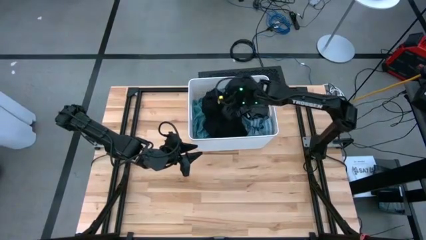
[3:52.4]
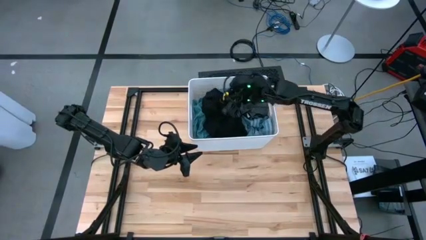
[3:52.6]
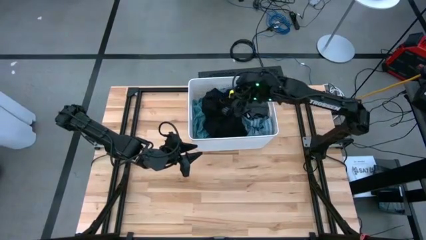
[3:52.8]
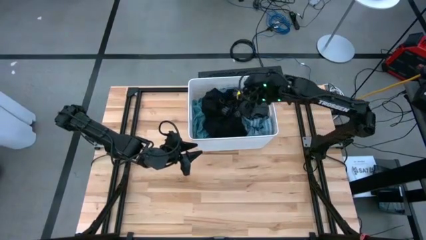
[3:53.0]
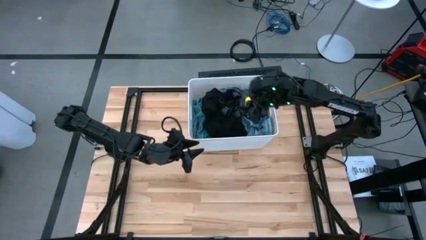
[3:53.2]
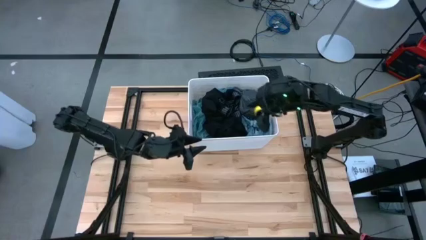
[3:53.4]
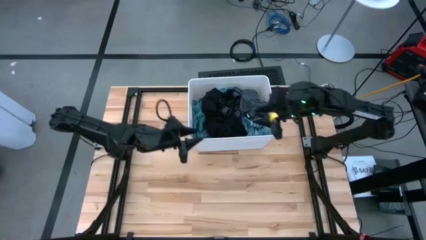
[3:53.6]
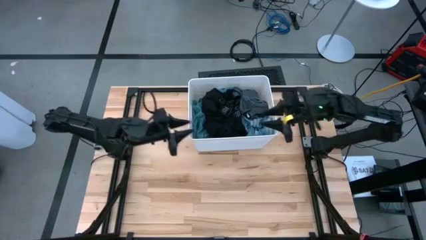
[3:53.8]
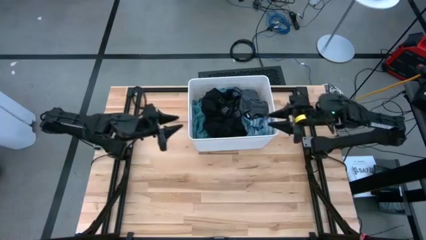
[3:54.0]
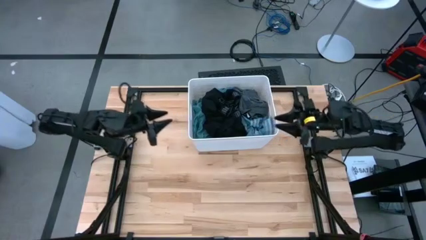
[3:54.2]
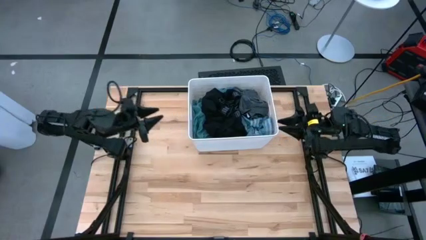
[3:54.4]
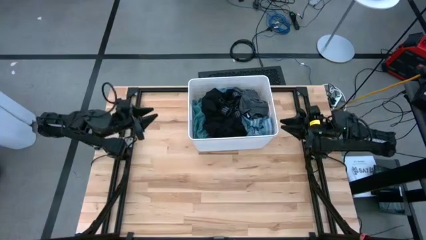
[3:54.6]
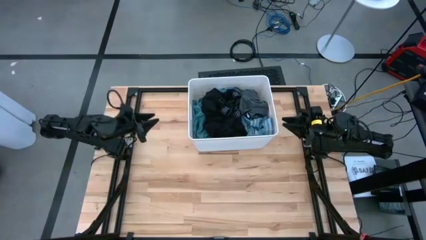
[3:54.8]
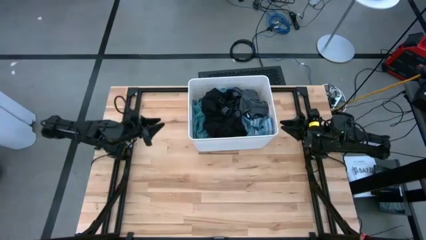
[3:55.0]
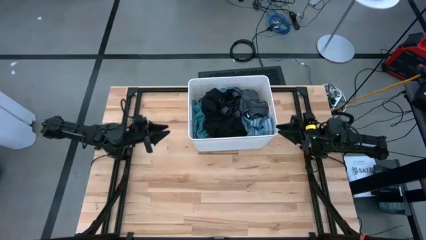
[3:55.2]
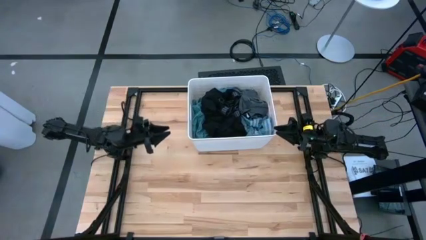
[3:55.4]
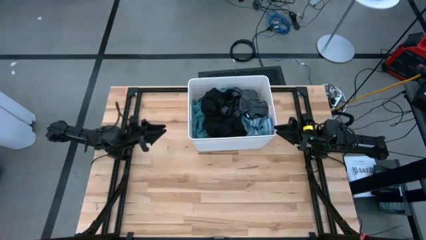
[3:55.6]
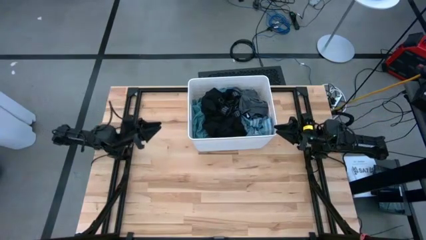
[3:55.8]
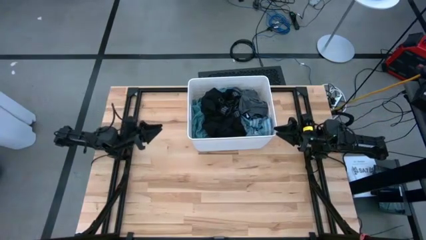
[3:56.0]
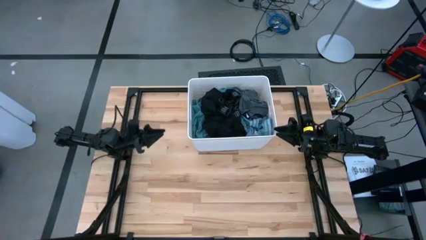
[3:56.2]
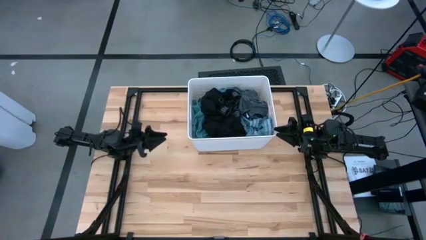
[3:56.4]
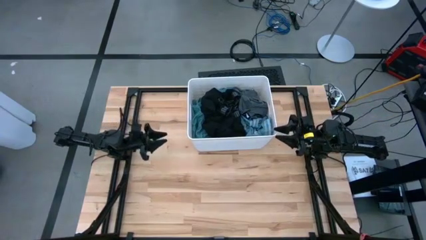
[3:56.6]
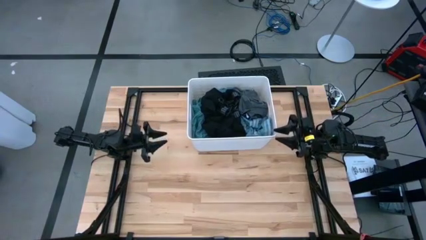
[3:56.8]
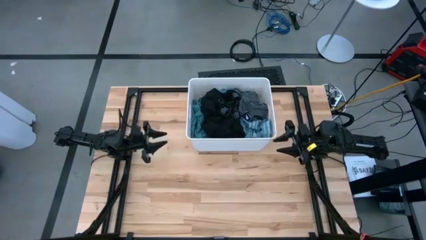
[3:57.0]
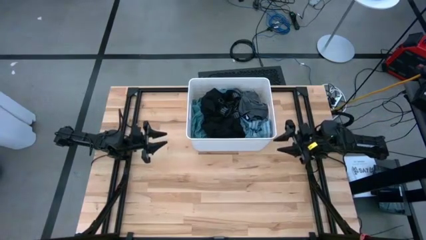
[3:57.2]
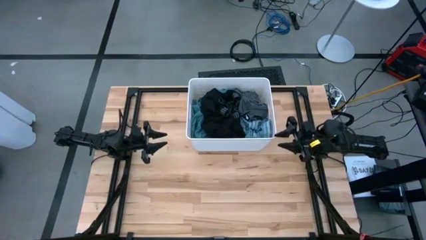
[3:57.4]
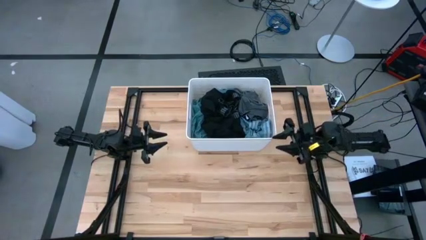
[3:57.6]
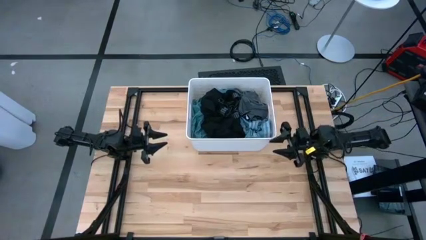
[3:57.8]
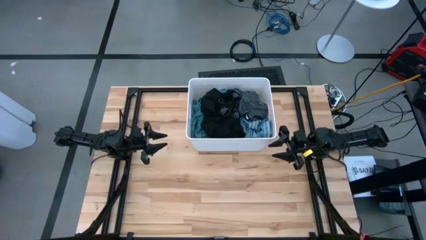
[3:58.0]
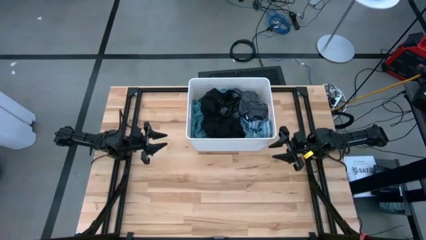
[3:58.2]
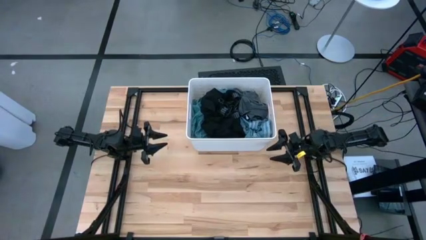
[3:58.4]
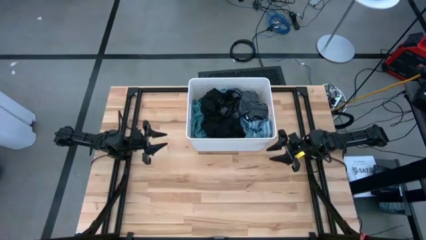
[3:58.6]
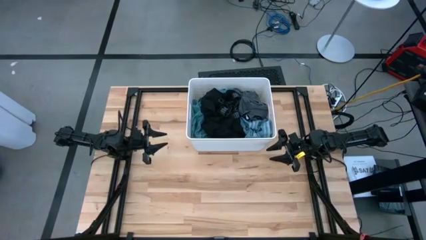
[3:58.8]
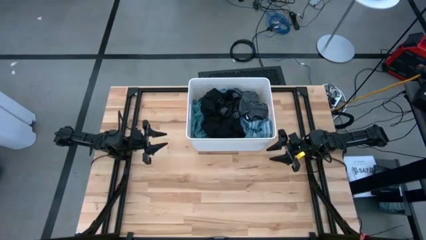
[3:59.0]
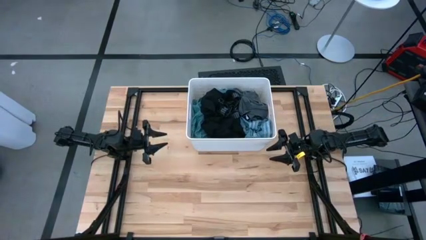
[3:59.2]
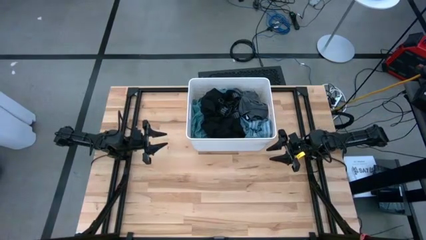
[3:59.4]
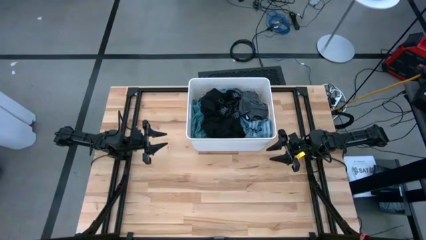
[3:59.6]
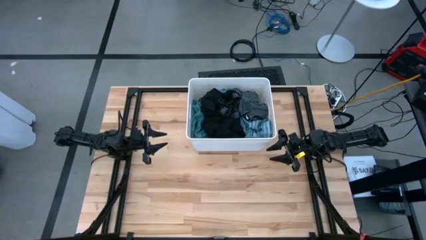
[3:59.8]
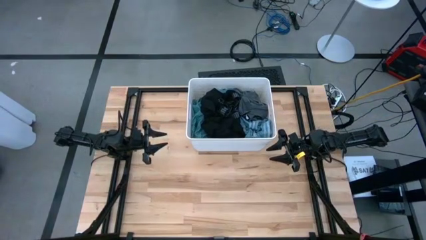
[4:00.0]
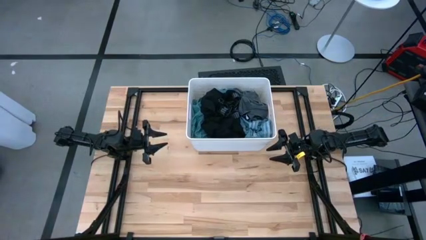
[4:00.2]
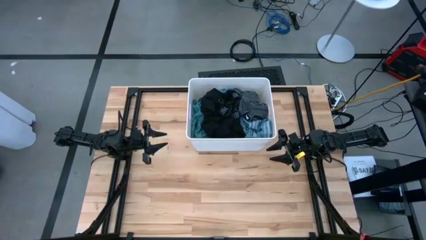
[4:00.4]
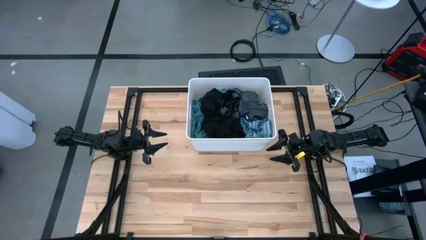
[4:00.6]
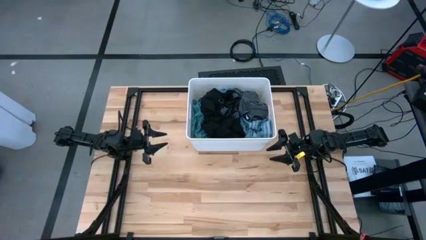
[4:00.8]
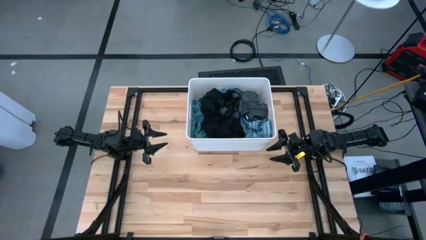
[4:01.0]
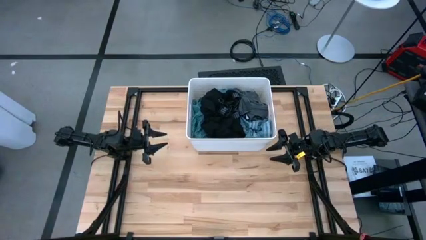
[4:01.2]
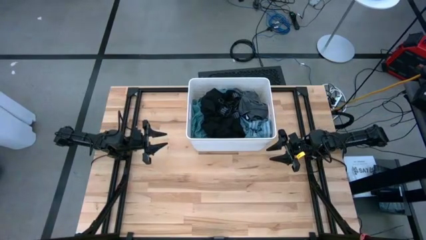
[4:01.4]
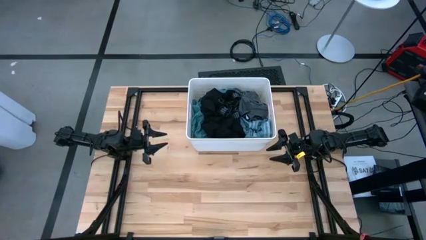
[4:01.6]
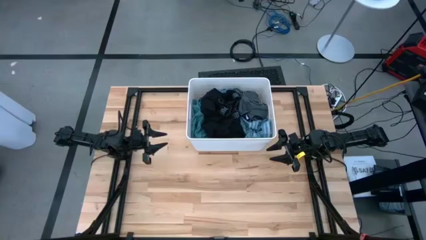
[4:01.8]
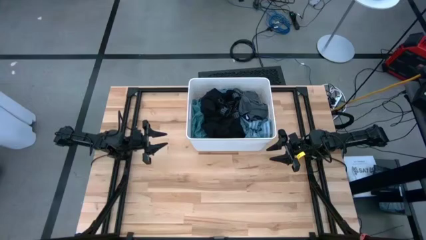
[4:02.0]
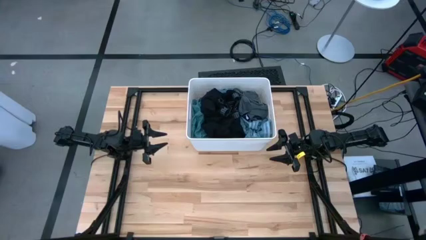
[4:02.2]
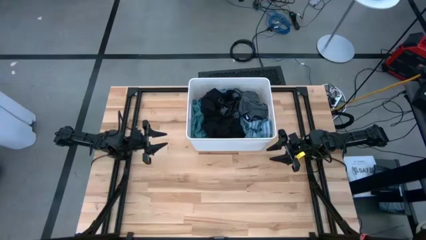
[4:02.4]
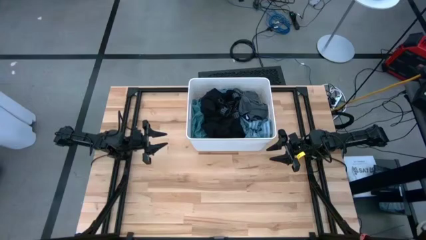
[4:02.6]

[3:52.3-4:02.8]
Task: Sort clothes
Return to Home Position

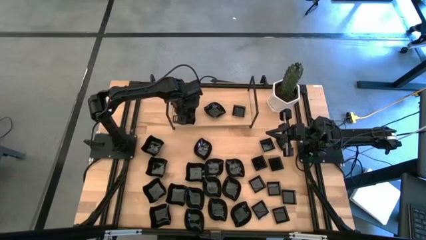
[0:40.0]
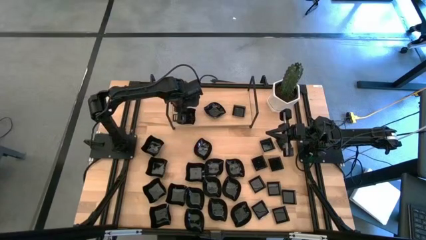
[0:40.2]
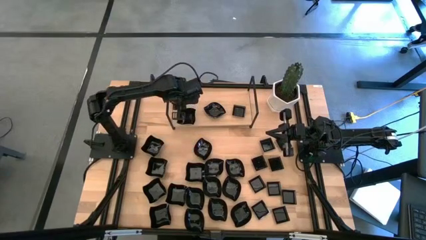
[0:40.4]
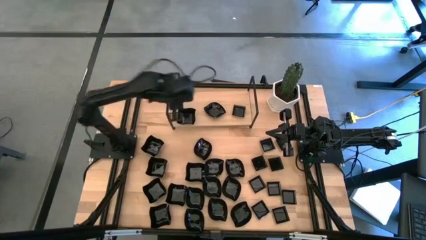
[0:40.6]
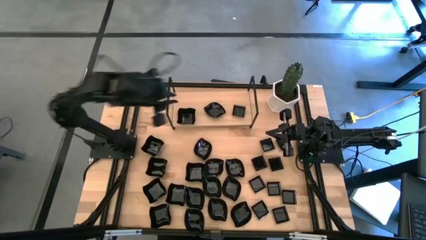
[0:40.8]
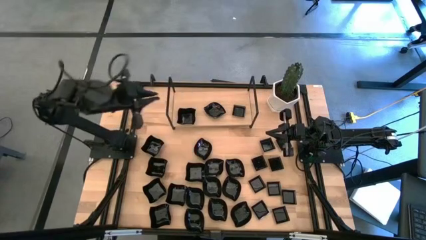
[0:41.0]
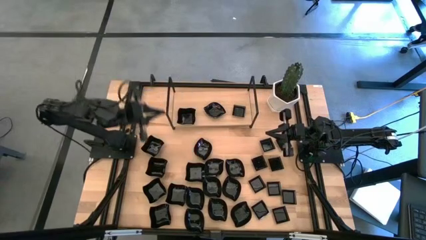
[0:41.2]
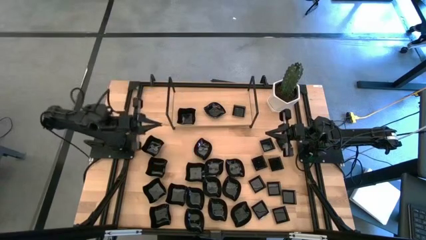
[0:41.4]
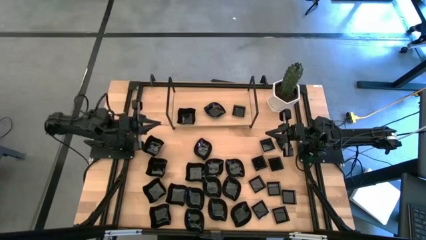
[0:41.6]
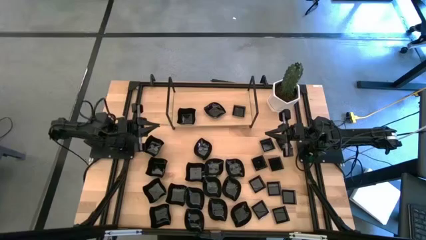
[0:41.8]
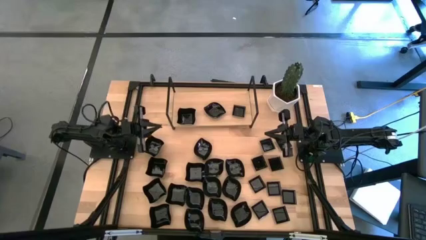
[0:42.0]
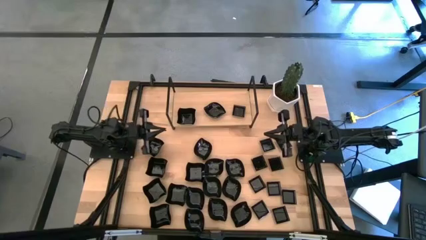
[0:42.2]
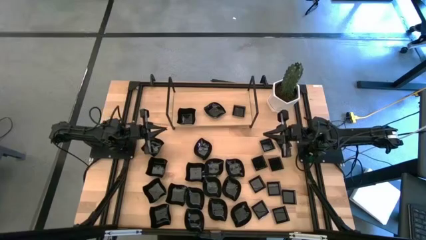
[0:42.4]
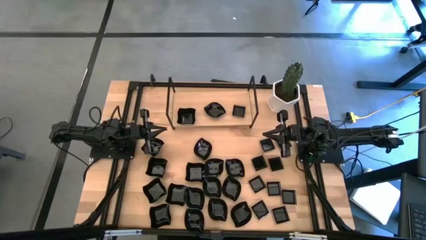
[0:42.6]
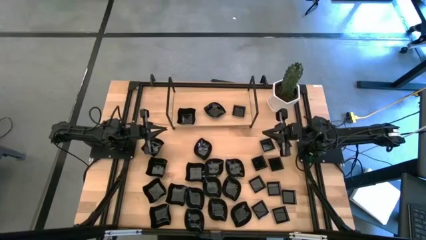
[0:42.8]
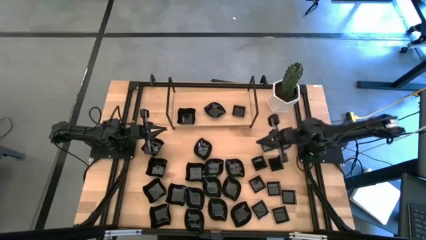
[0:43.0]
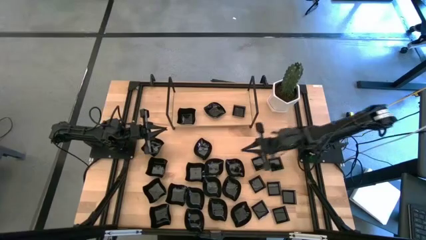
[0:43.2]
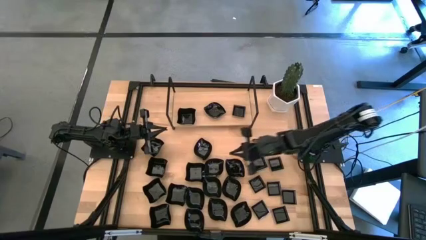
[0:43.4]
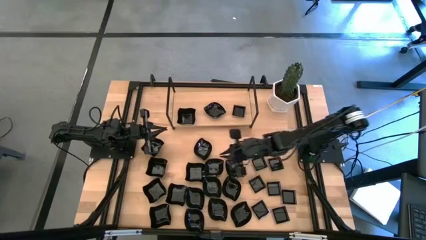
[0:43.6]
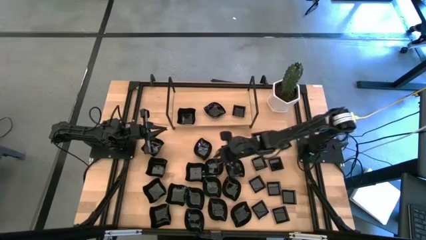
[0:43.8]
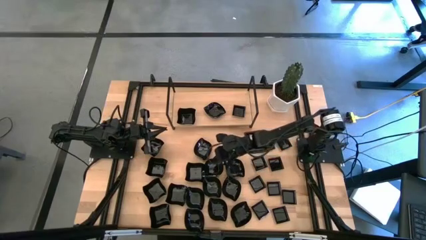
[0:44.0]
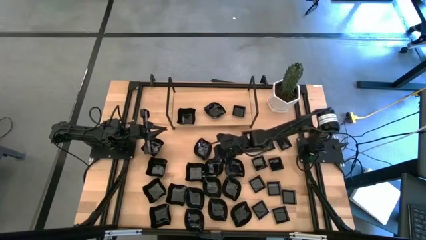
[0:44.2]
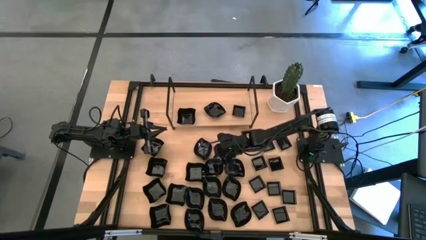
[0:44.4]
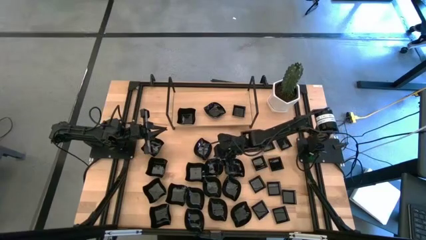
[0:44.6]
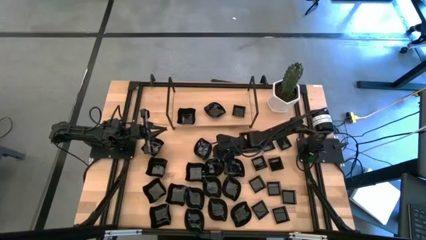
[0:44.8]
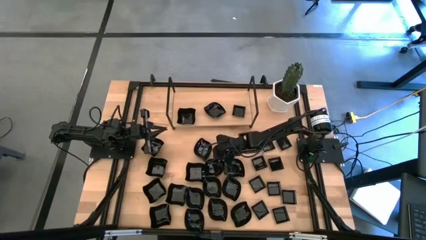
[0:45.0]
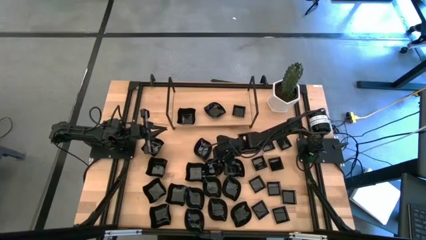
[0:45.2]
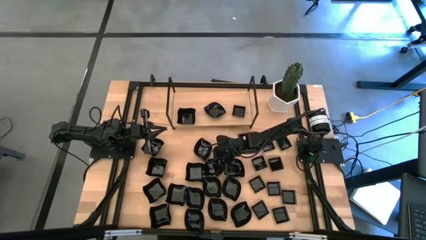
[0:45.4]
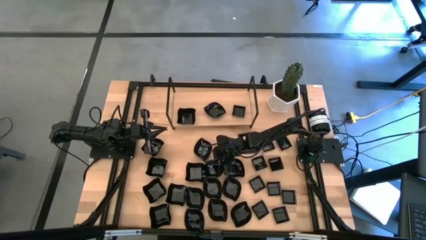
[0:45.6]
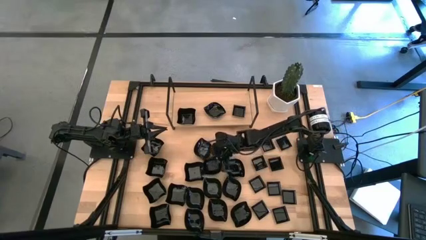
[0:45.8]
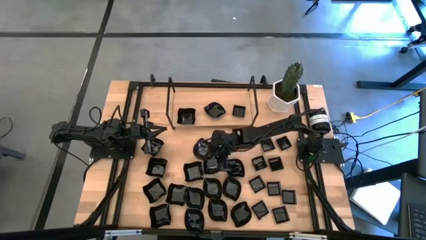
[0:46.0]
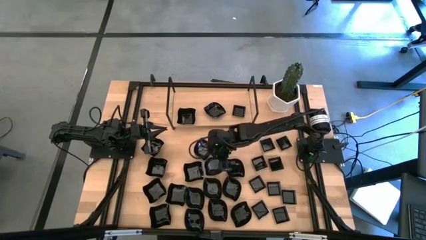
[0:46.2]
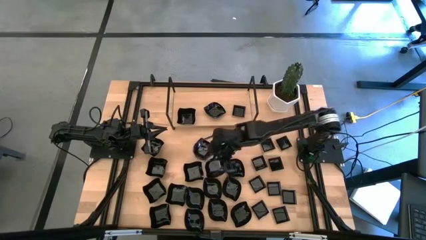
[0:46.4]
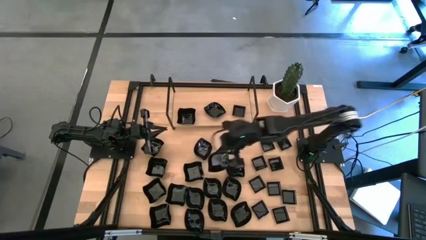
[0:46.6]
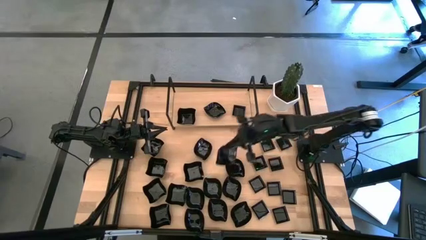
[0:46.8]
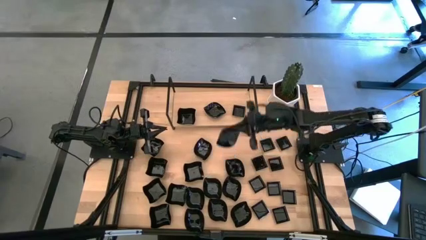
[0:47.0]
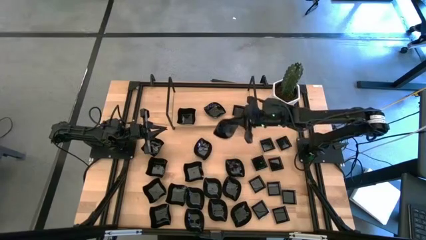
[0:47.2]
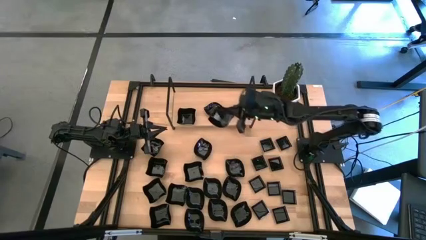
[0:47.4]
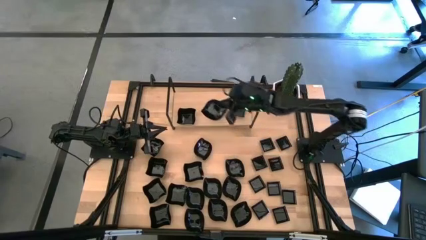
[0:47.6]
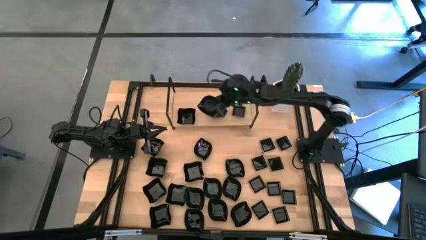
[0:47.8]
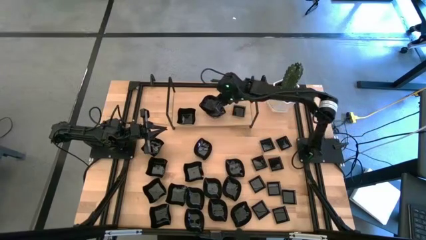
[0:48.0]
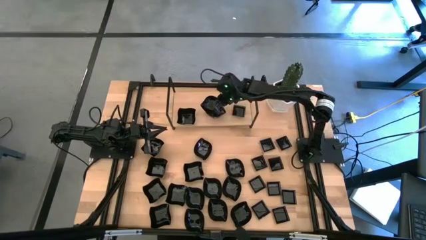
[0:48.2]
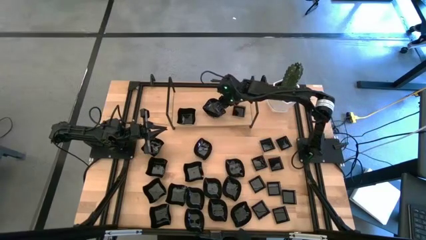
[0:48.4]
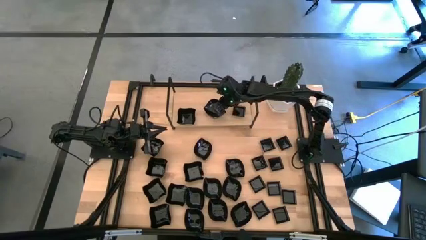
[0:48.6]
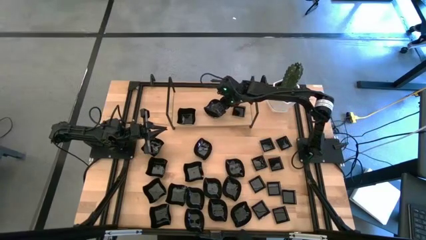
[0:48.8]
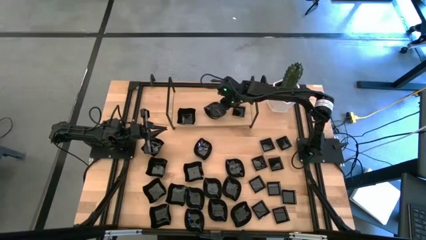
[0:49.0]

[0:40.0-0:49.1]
Task: Pick & Place Mini shaped plates
Stack the black leaf-shaped plate on top of the black leaf-shaped plate on the shelf
